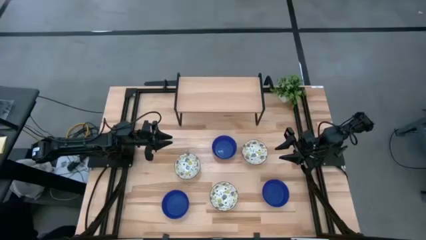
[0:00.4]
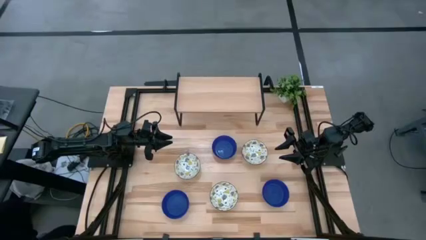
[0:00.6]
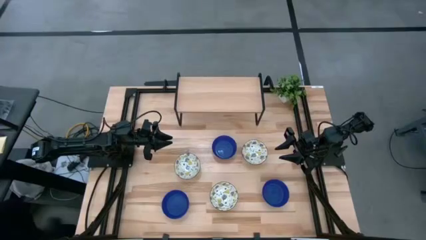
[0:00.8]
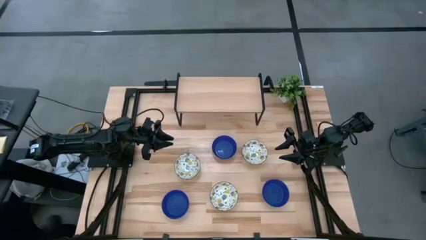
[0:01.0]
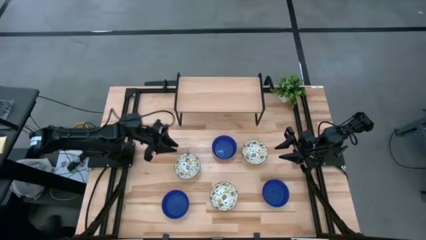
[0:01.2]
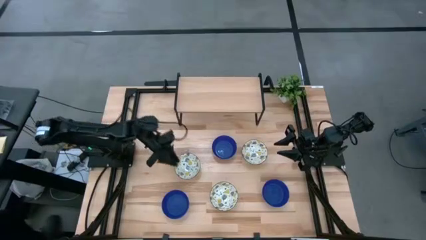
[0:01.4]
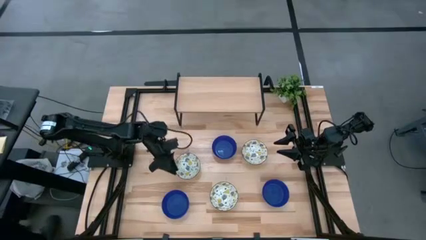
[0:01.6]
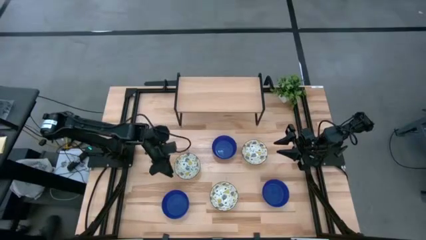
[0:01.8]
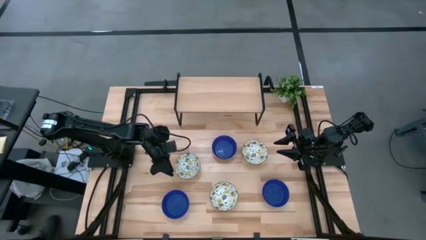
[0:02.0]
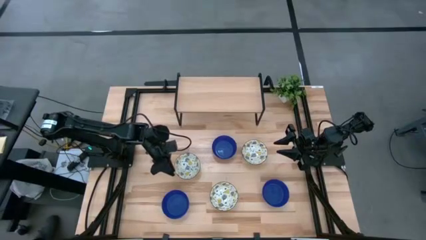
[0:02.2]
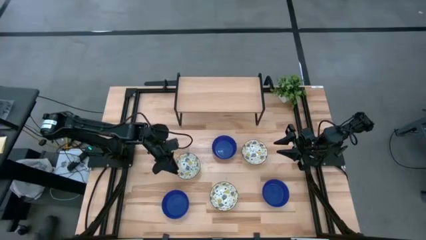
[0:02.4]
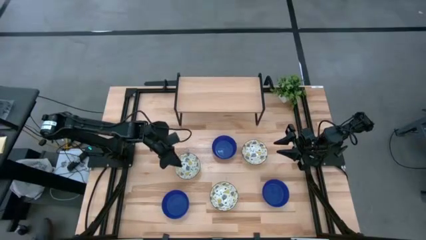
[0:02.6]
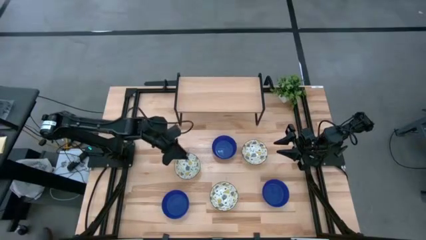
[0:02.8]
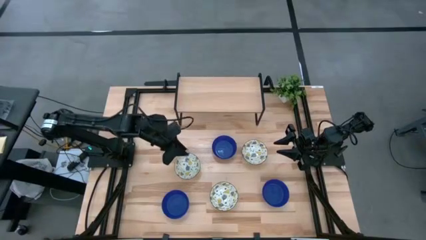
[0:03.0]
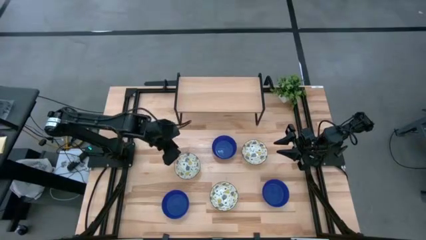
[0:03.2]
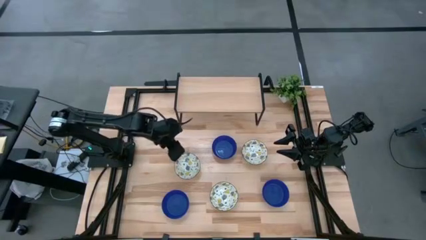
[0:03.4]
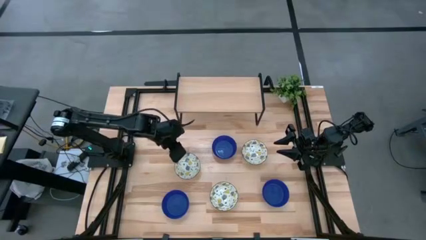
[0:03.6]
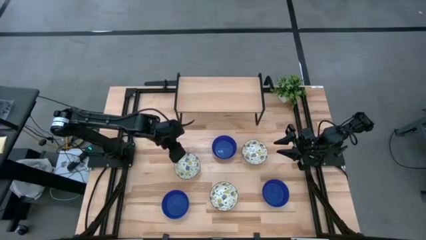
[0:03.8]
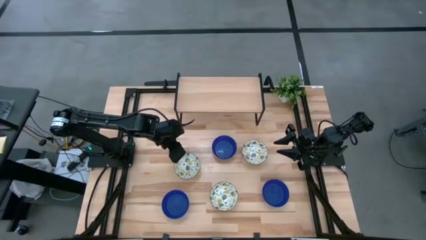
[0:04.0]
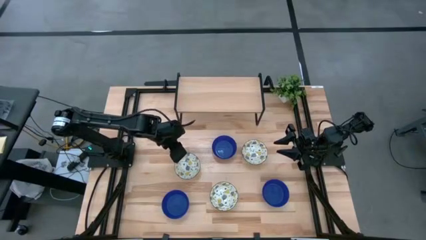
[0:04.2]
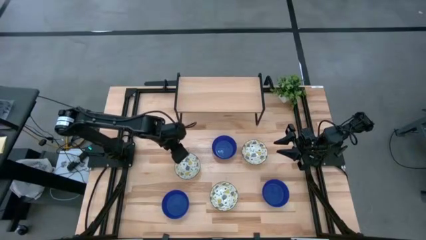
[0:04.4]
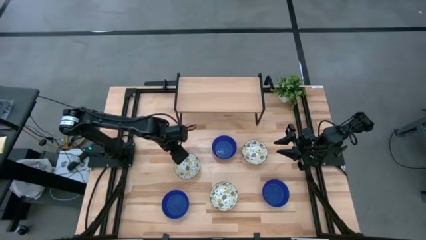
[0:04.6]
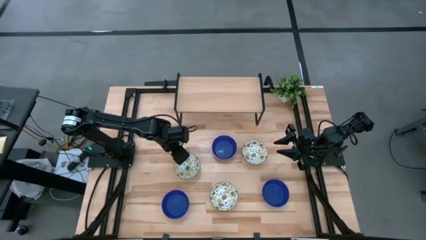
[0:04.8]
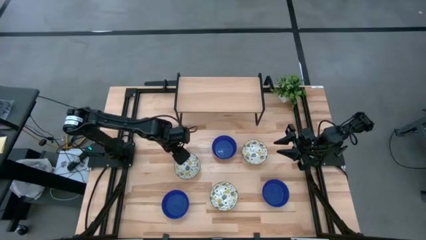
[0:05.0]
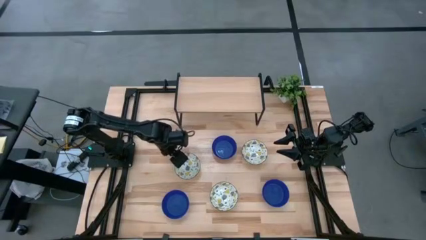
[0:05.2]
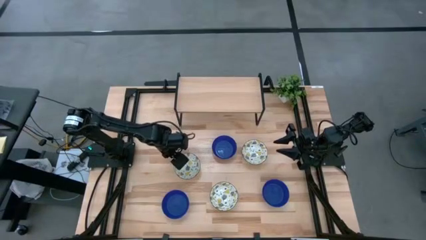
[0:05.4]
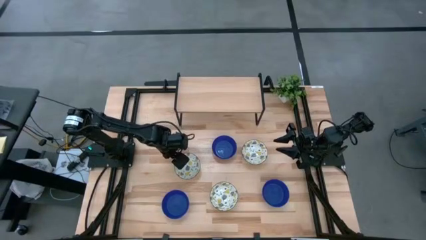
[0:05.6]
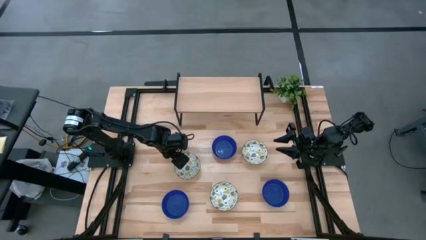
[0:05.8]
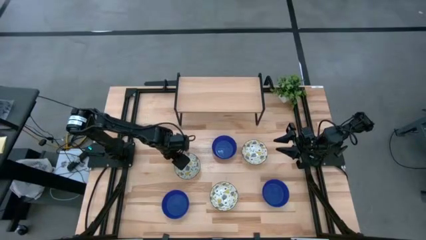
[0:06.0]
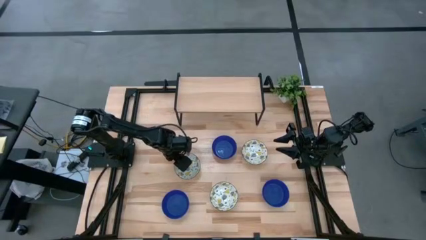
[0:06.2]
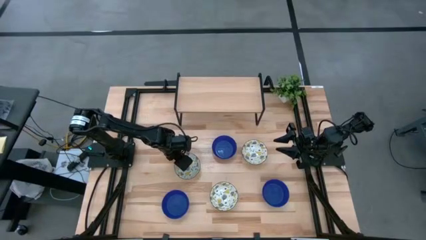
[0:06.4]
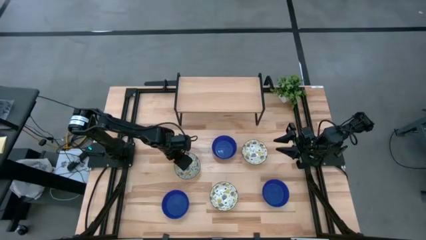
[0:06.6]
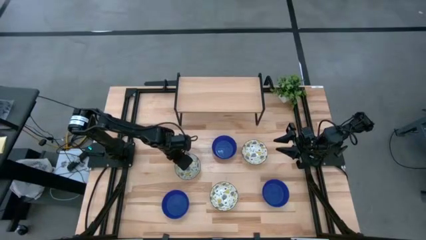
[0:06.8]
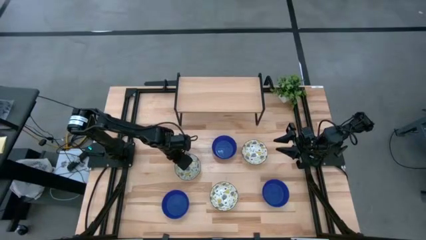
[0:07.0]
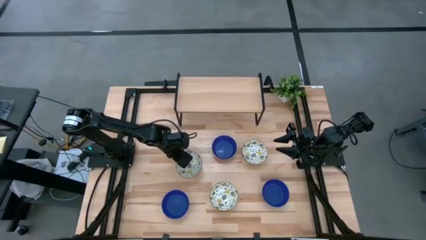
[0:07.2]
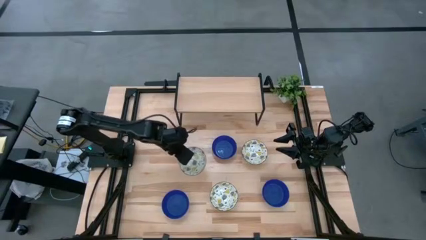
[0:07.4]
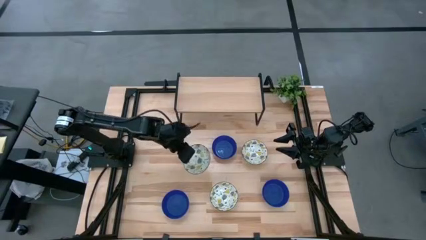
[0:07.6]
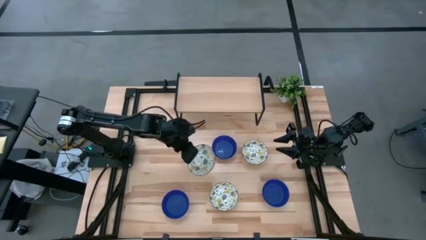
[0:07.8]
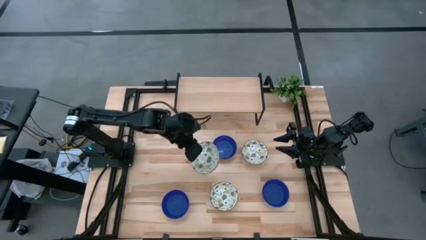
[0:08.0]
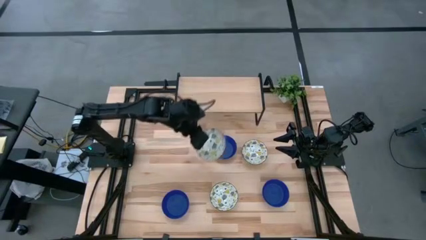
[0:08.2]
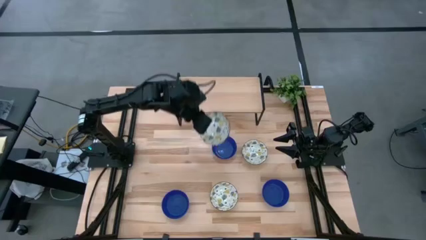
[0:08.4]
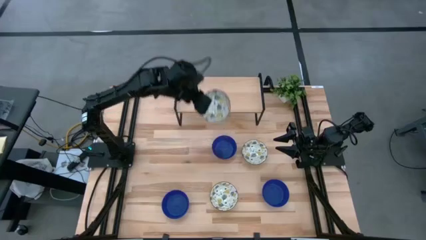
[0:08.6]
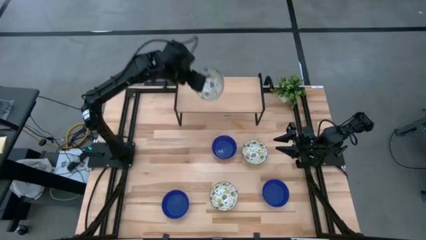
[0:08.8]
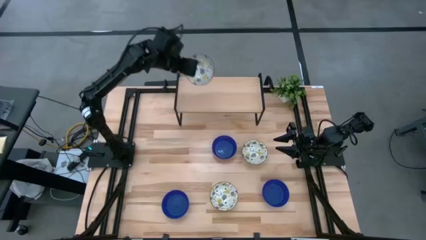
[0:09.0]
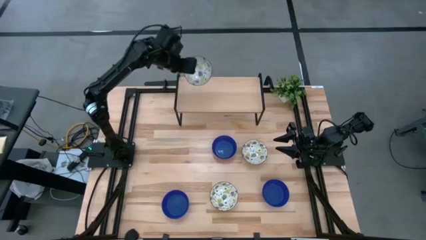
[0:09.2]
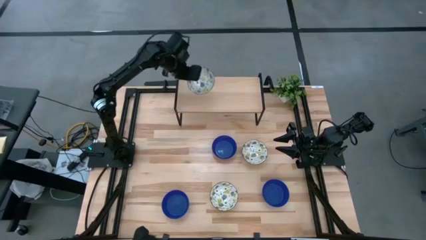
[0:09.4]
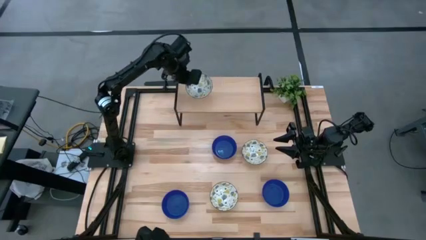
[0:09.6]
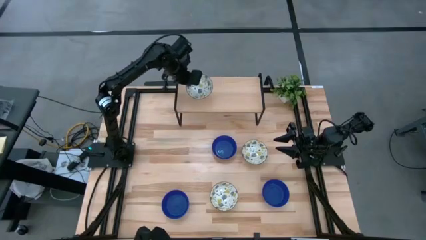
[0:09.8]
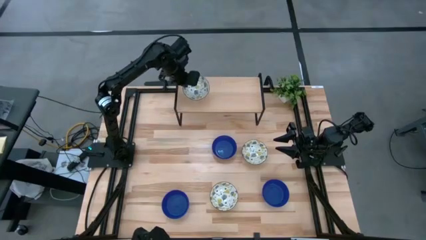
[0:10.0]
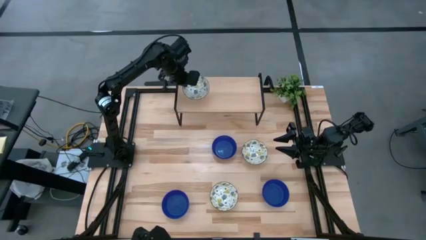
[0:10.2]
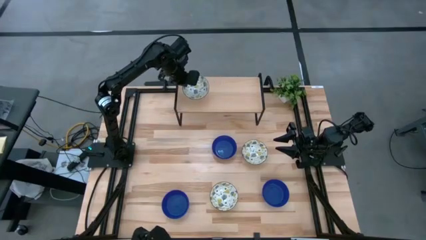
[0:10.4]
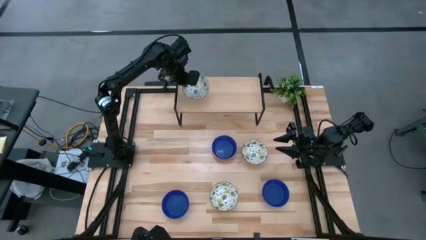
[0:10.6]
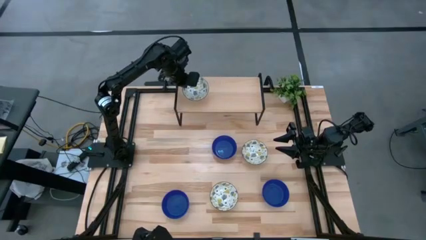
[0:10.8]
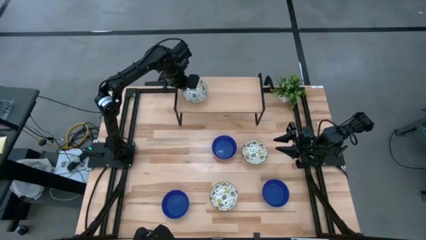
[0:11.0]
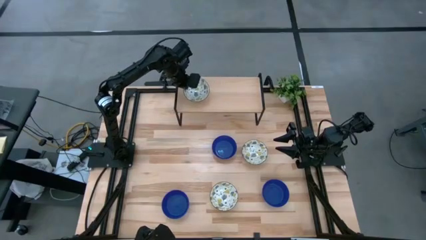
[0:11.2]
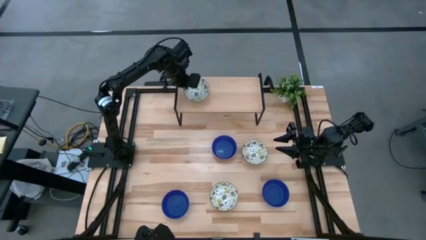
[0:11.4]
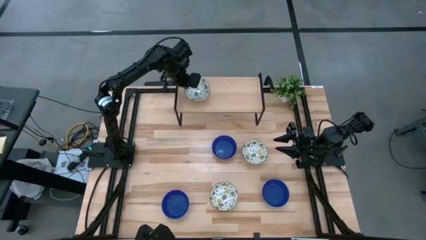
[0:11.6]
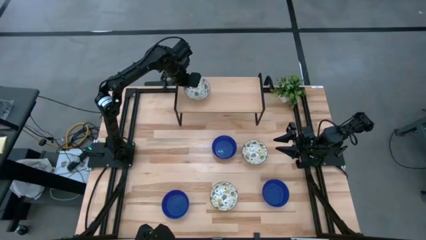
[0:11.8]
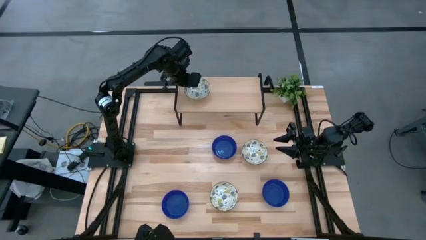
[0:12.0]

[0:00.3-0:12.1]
Task: Pick & Place Mini bowls
Put the top left white bowl on the shelf
